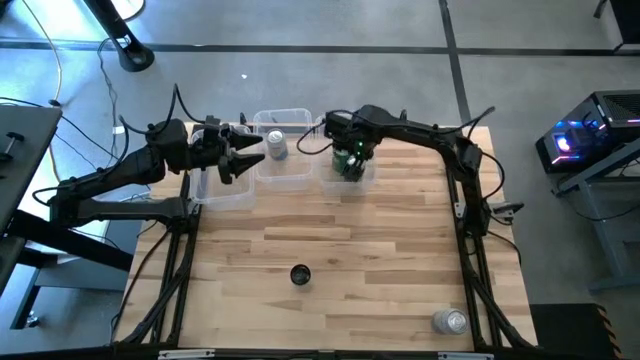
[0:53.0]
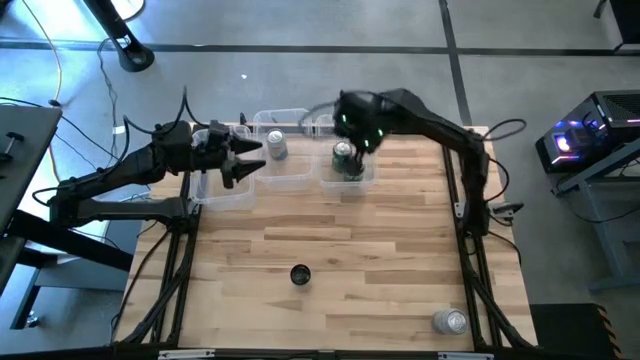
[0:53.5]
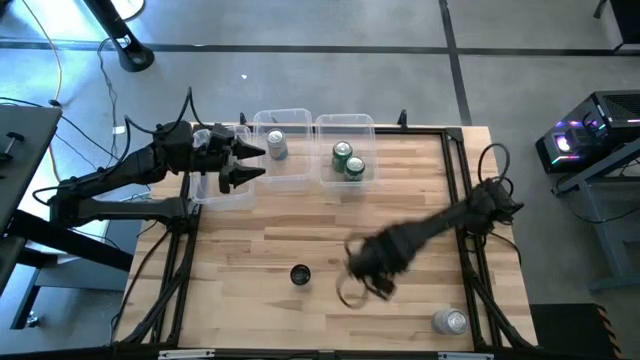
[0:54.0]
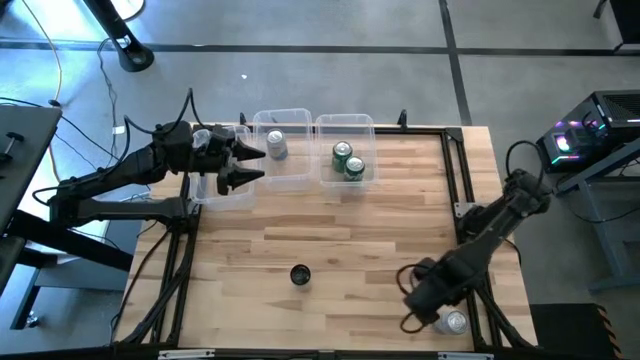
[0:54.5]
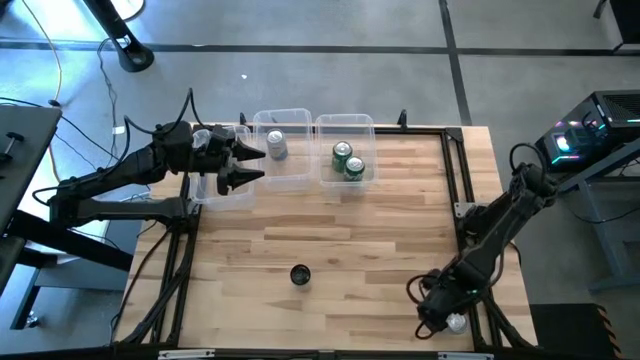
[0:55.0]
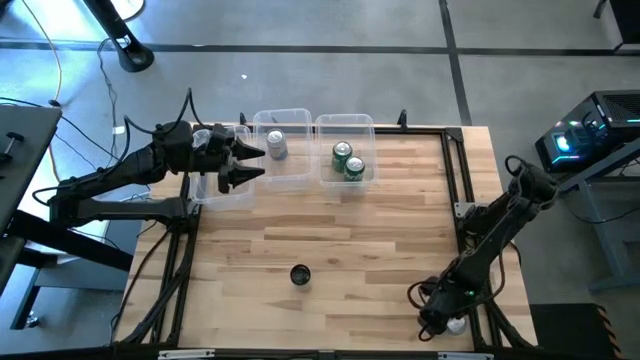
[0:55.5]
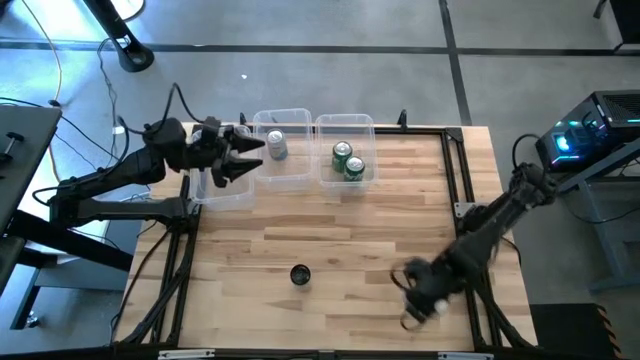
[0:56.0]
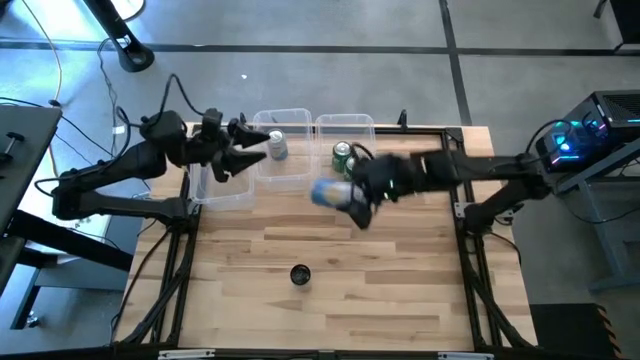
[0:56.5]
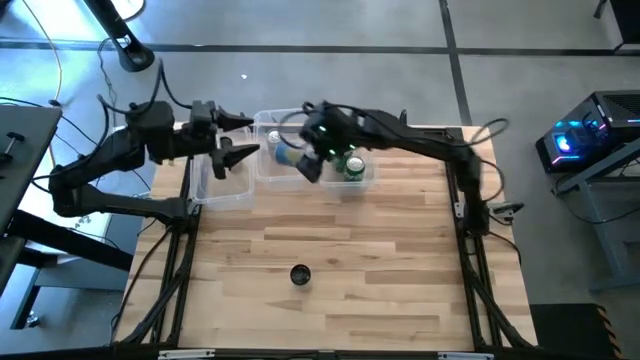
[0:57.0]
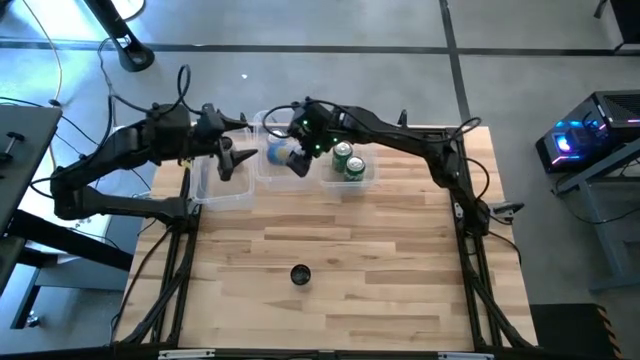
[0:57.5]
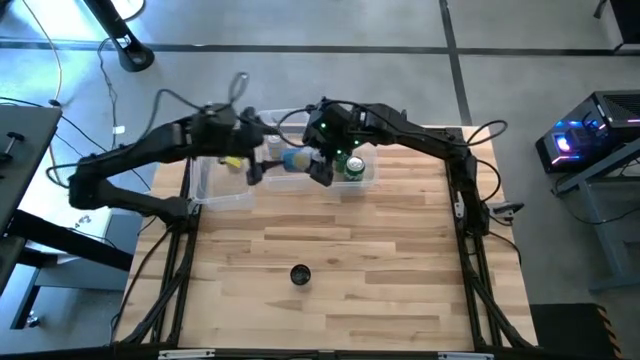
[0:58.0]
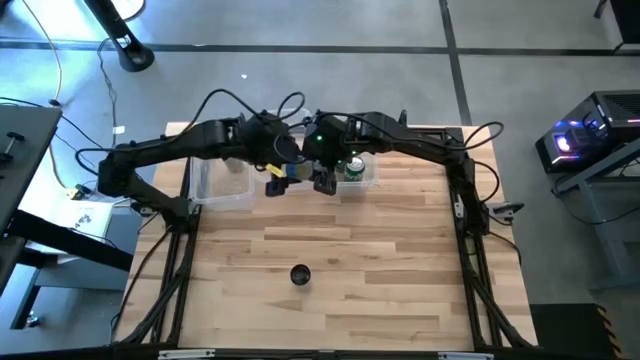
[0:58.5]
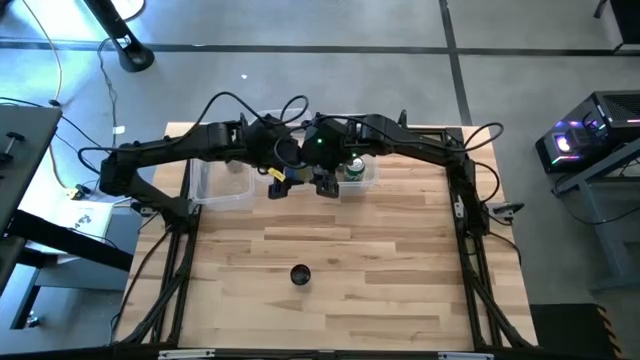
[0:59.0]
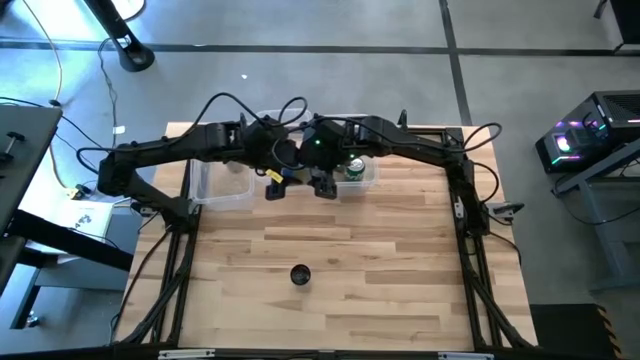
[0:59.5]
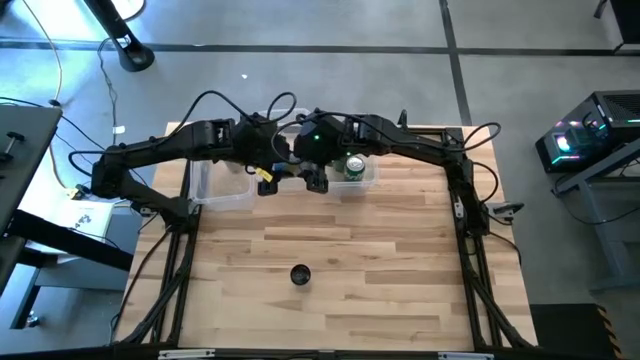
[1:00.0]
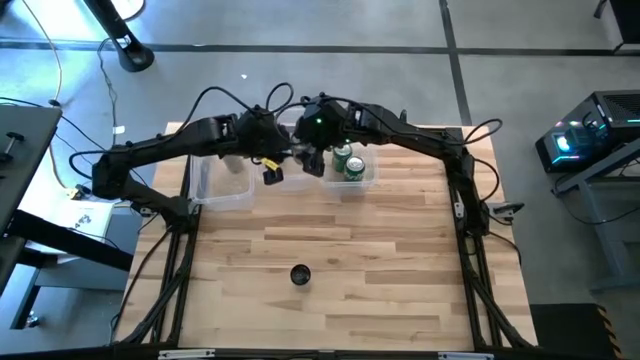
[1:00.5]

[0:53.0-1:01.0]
Task: Sort soda cans
Put the blue white soda can into the middle transparent bin

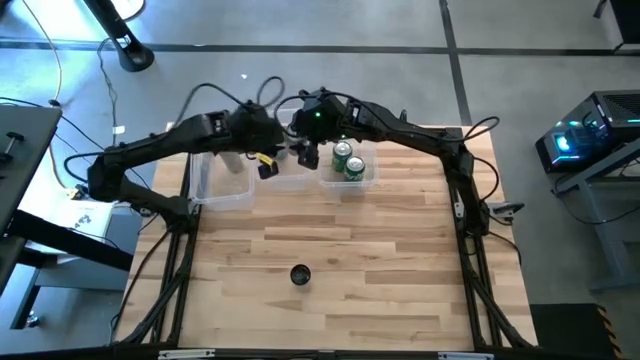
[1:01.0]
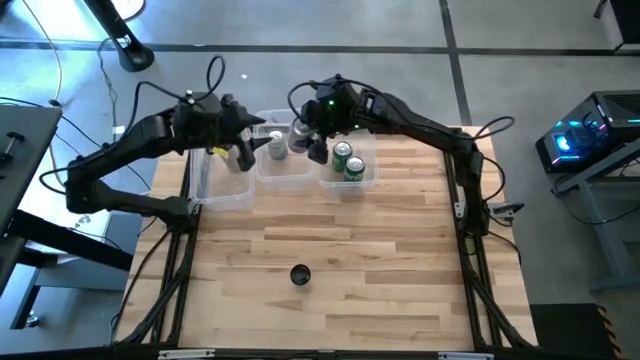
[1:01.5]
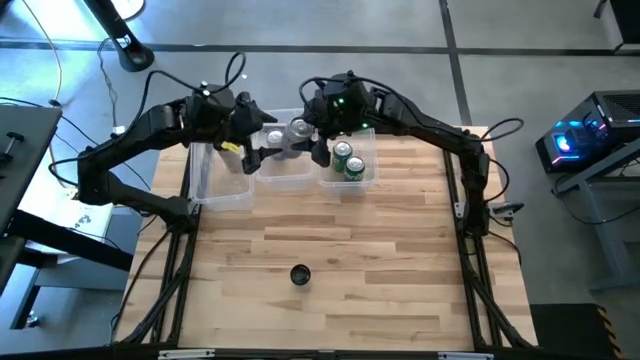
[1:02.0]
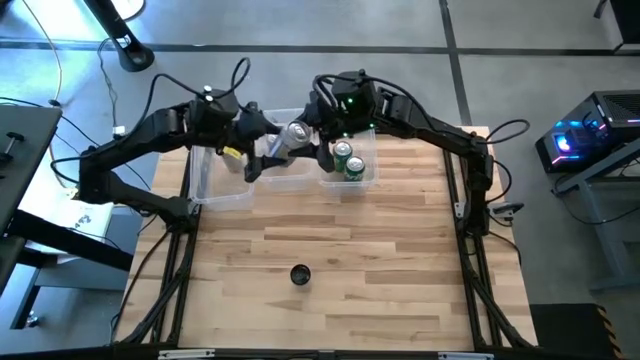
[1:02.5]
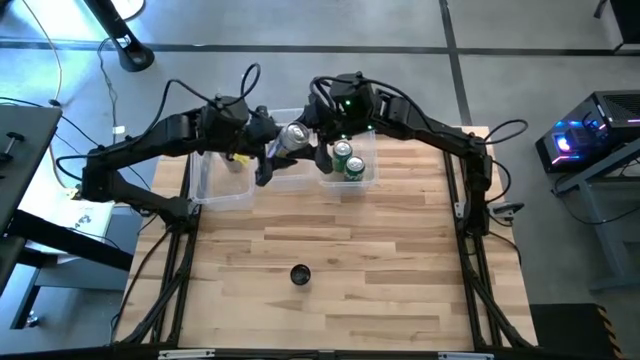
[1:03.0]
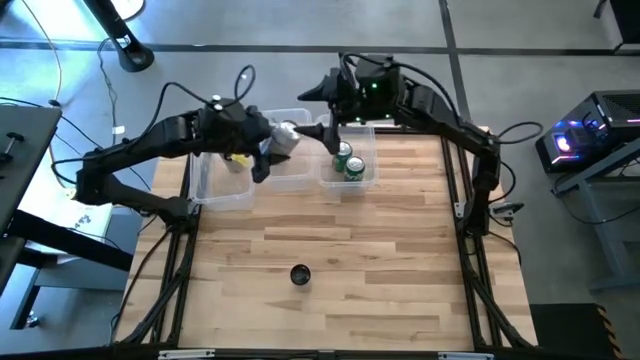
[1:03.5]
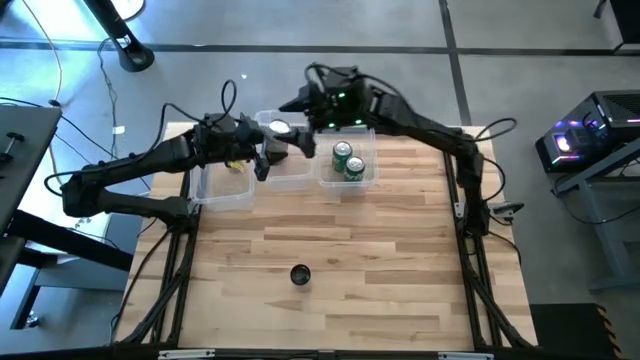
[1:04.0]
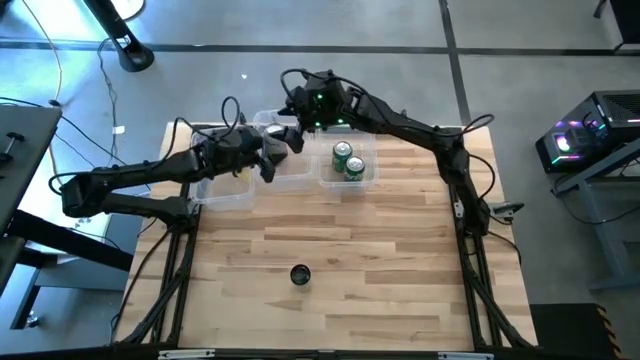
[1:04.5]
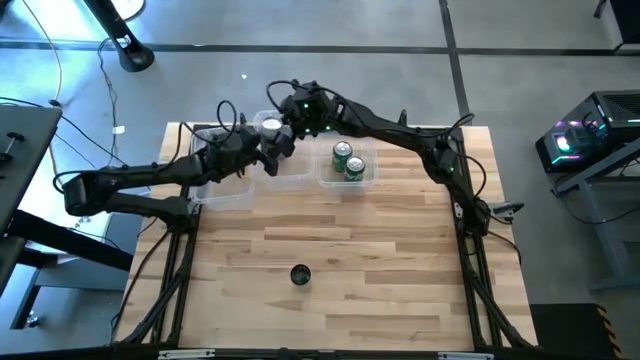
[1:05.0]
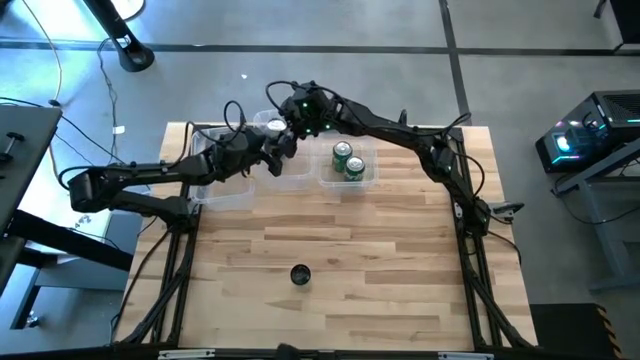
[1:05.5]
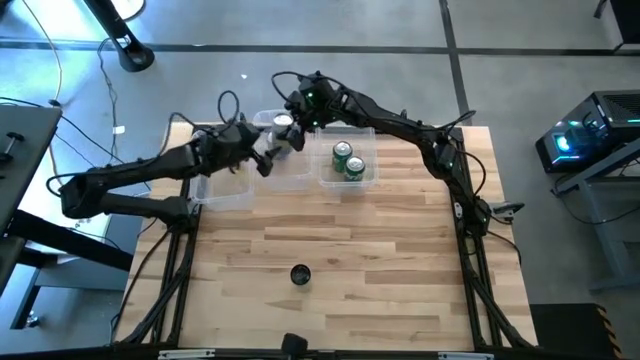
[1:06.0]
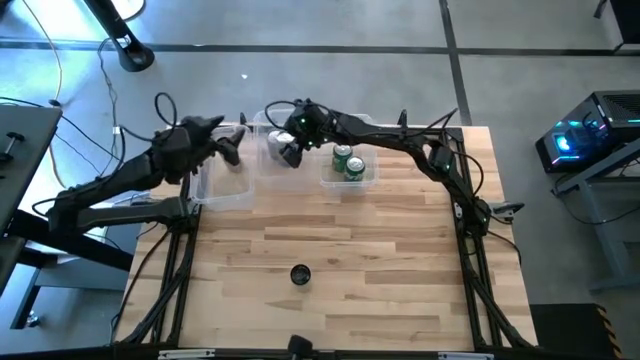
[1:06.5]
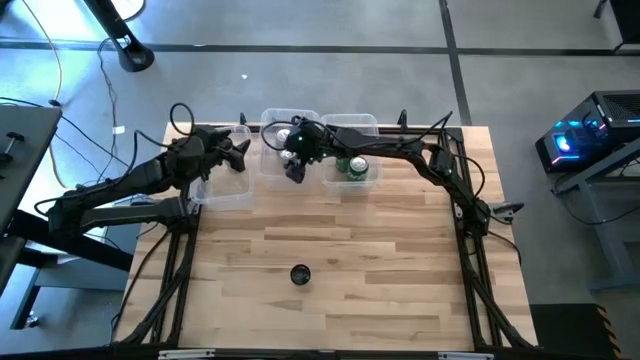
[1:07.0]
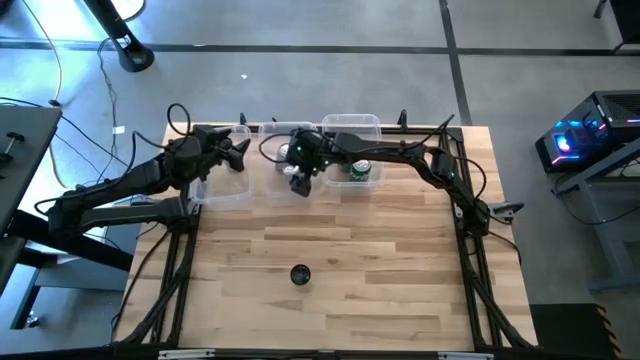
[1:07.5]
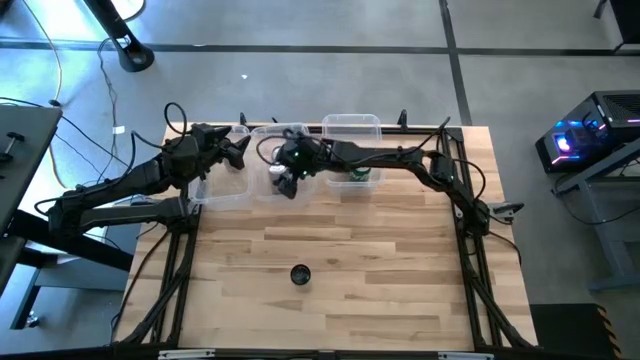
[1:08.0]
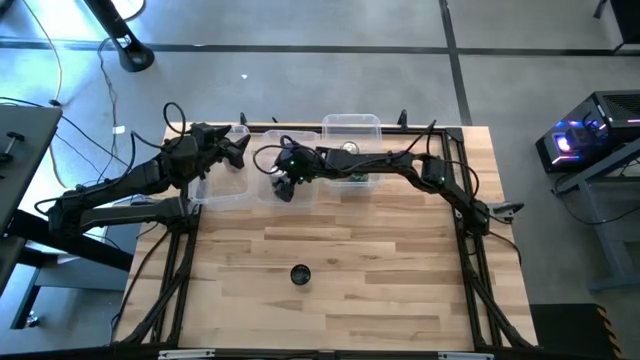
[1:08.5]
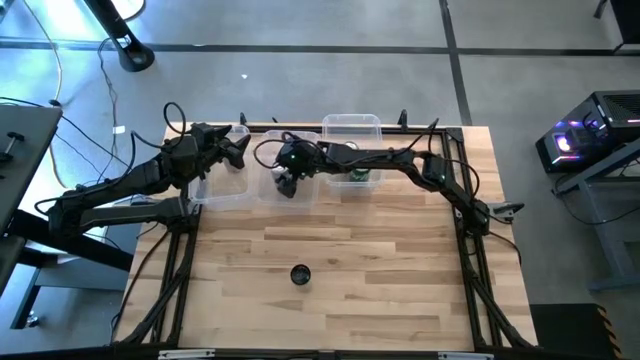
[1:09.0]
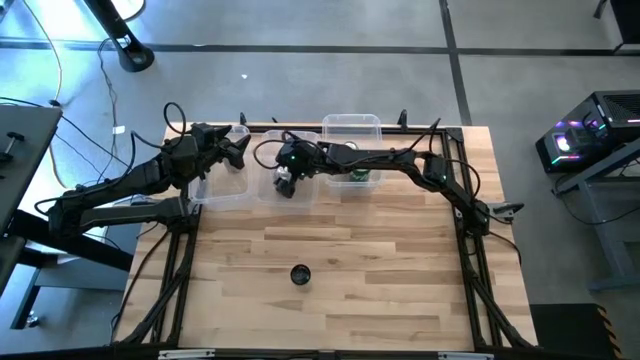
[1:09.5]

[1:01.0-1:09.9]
Put the blue white soda can into the middle transparent bin

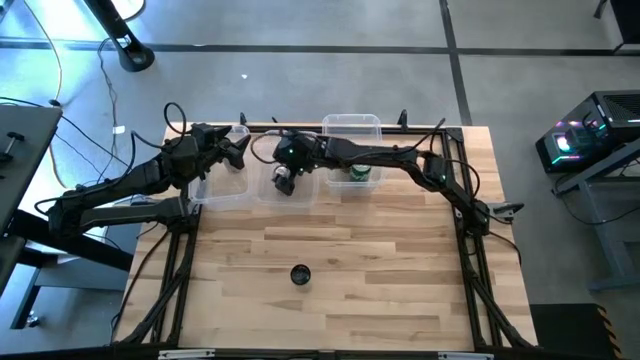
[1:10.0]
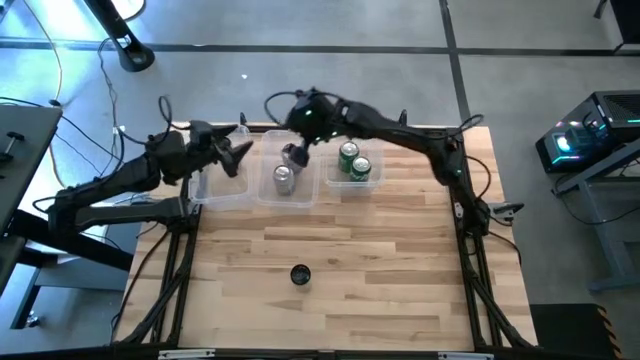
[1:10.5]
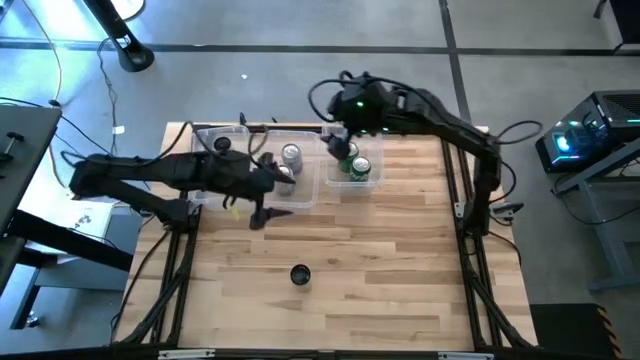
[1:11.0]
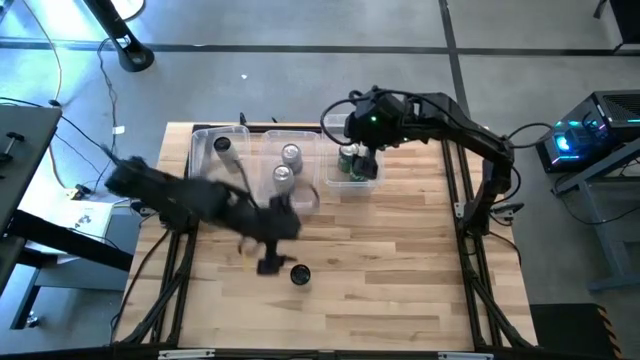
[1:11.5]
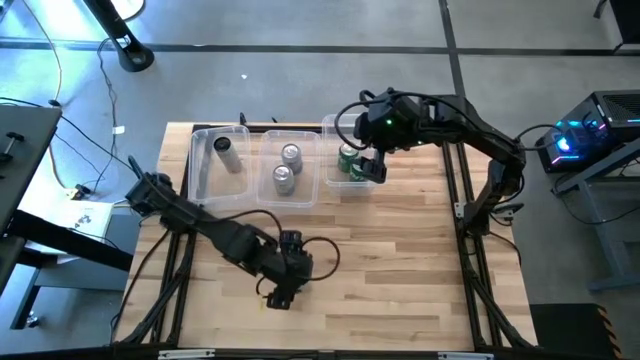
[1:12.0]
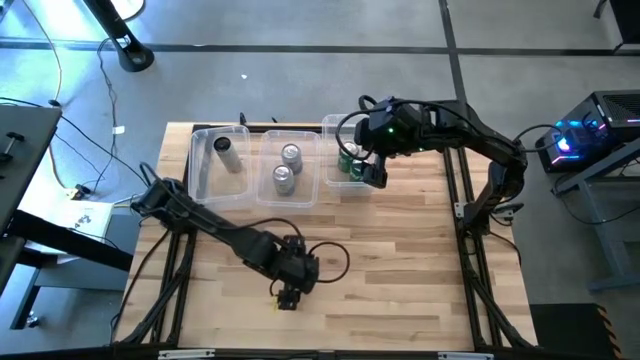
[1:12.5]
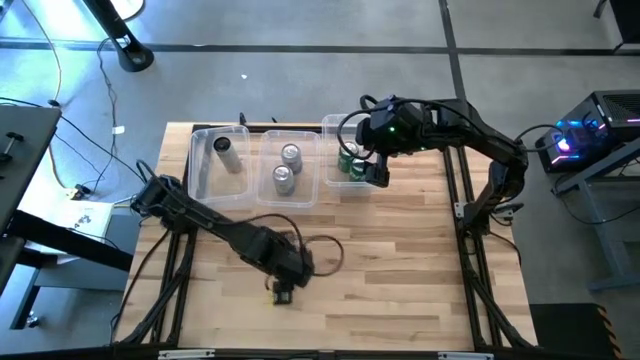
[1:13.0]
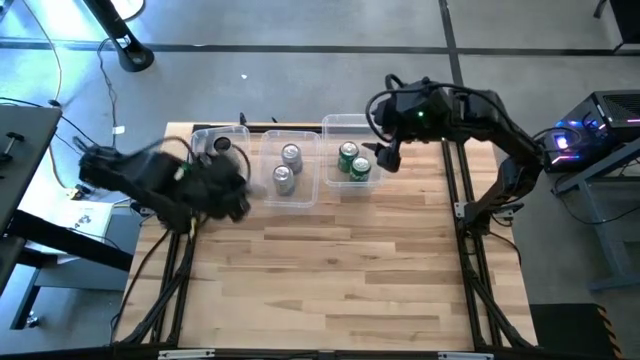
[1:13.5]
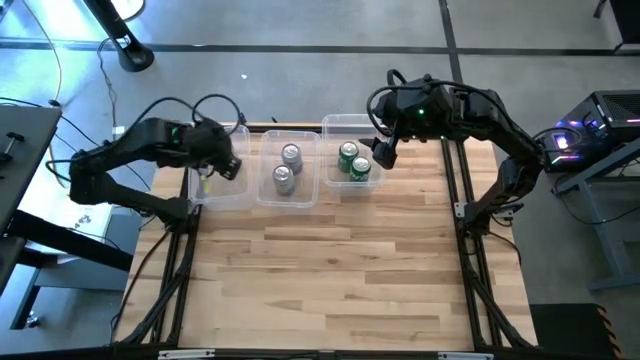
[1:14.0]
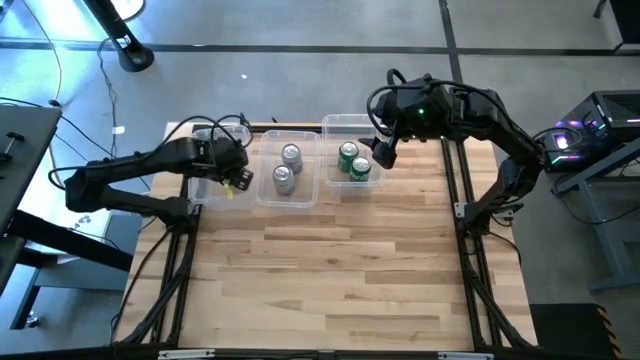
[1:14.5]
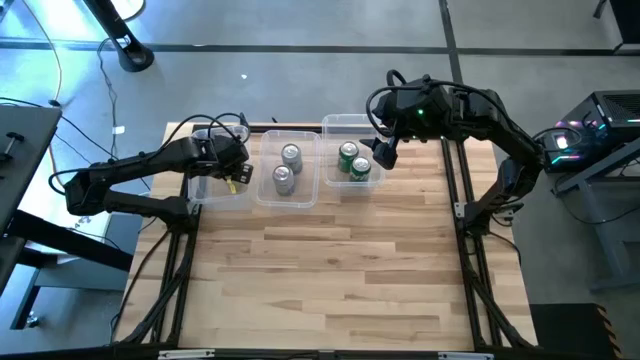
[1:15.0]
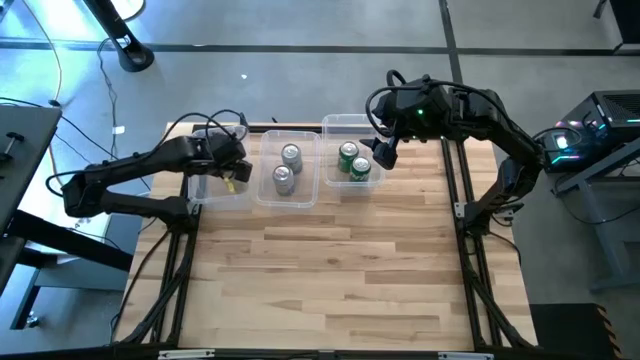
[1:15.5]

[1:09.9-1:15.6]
Put the white yellow soda can into the left transparent bin
